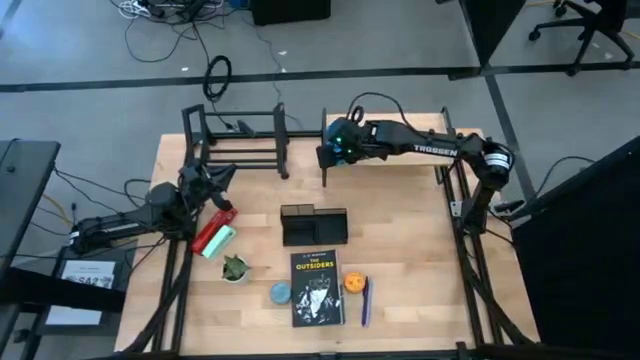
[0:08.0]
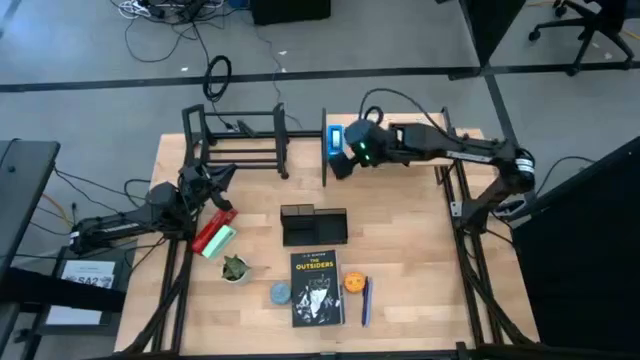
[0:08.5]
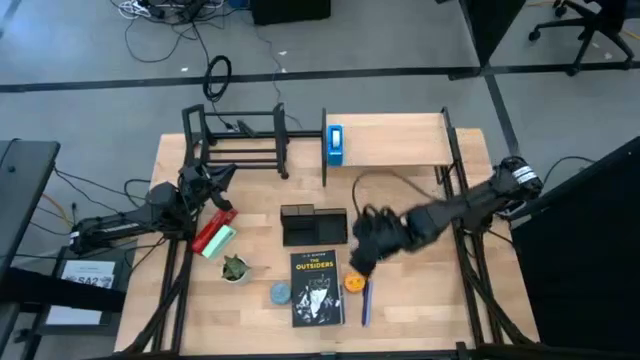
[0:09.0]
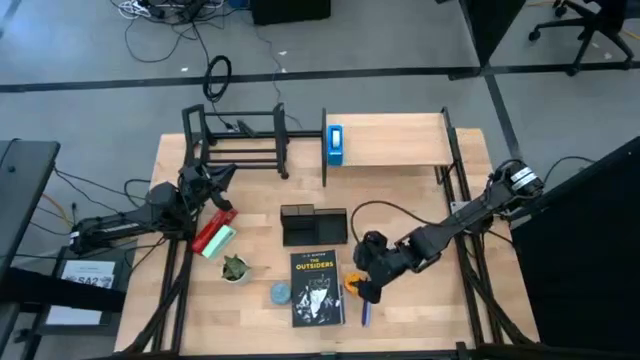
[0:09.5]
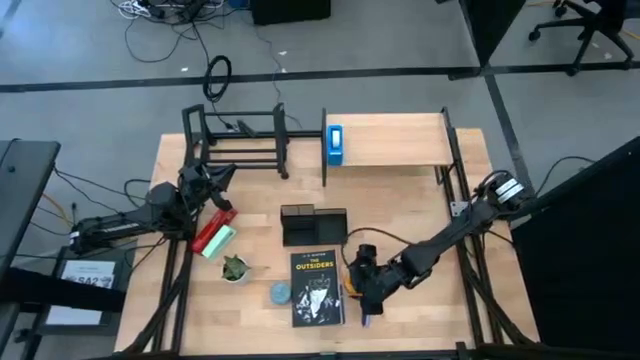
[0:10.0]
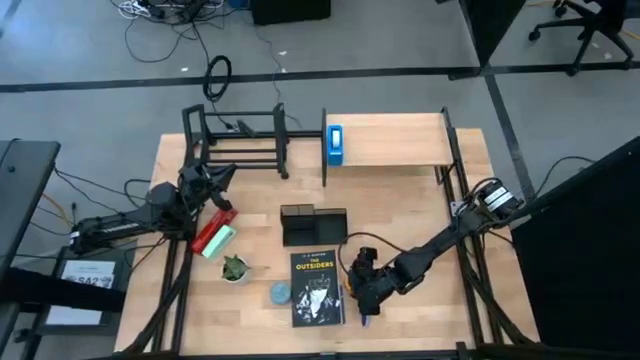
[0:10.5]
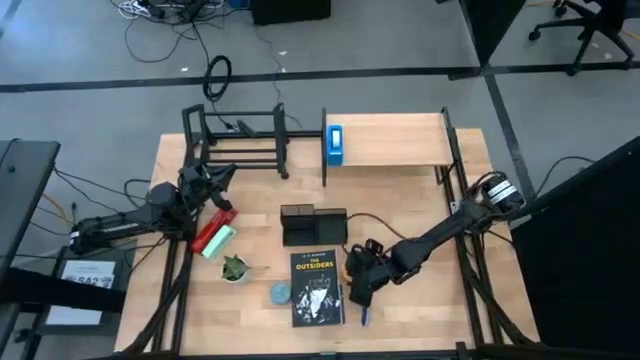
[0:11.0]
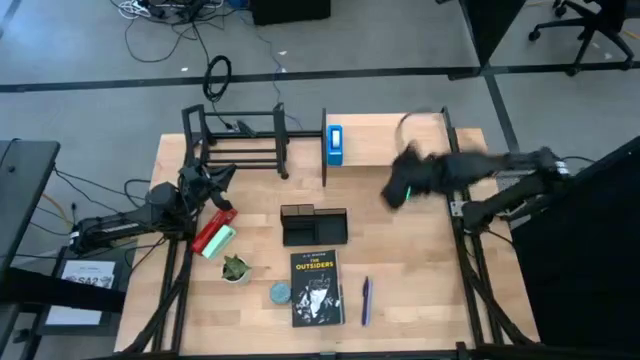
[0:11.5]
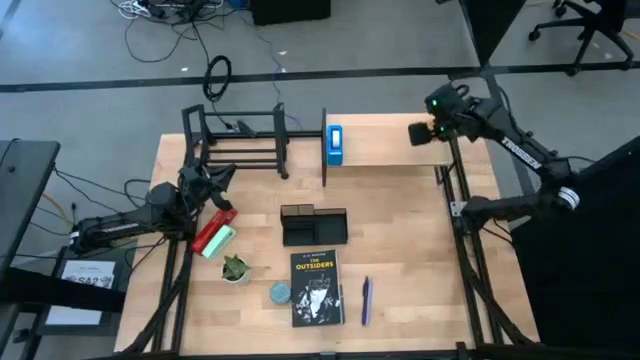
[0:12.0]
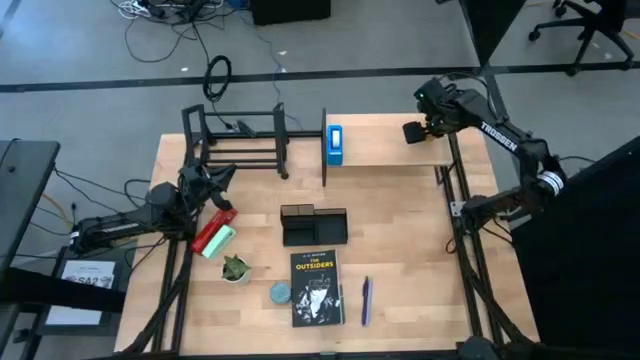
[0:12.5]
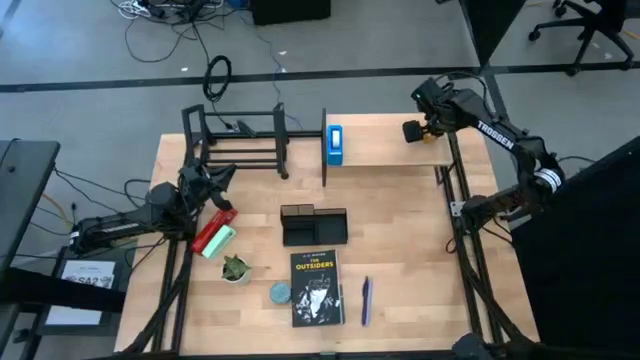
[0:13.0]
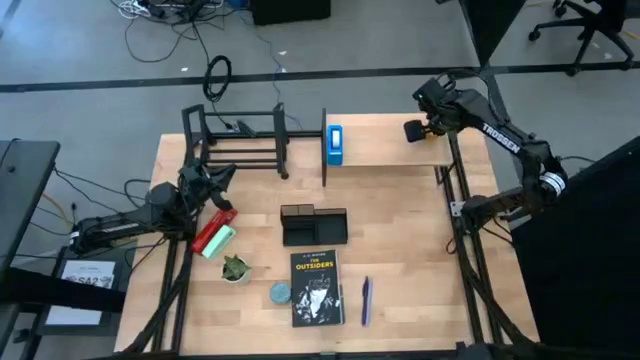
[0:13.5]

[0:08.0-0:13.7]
Task: Stock shelves
Put the yellow scented candle on the shelf

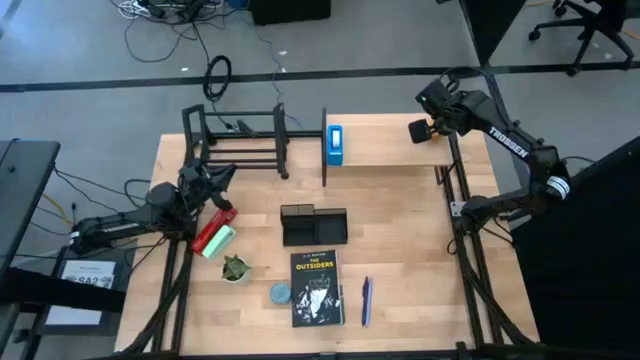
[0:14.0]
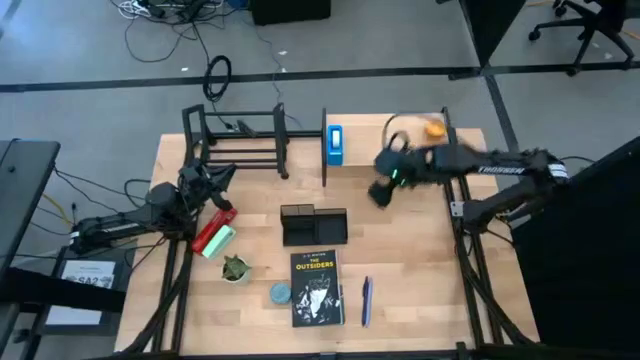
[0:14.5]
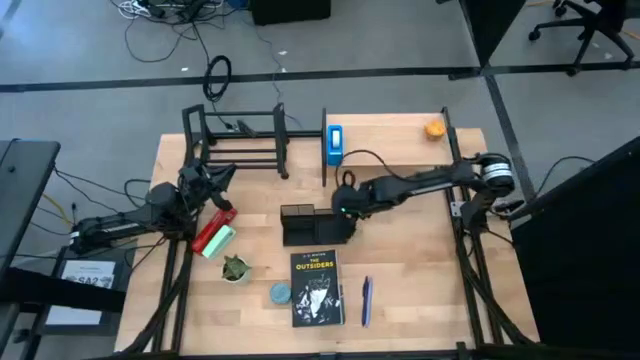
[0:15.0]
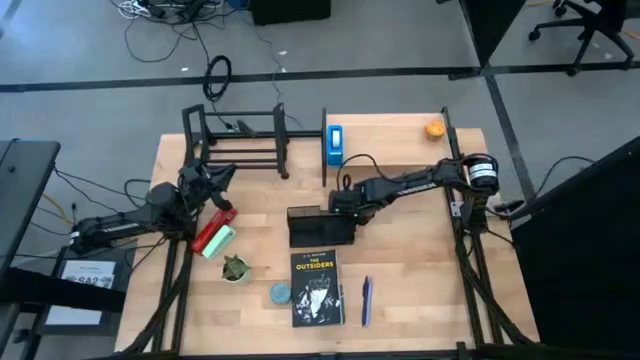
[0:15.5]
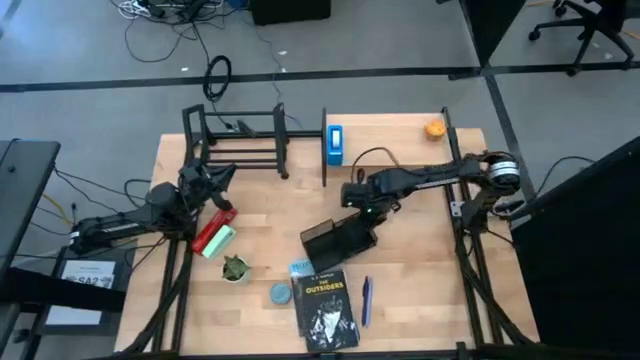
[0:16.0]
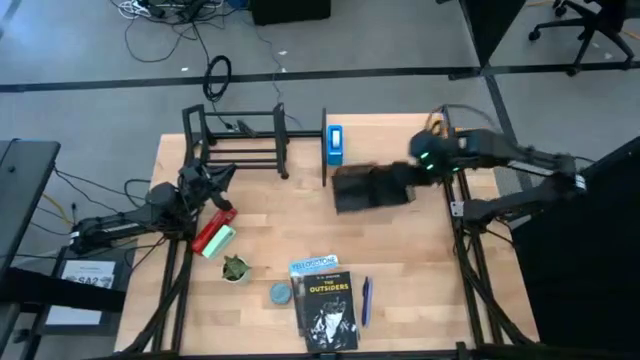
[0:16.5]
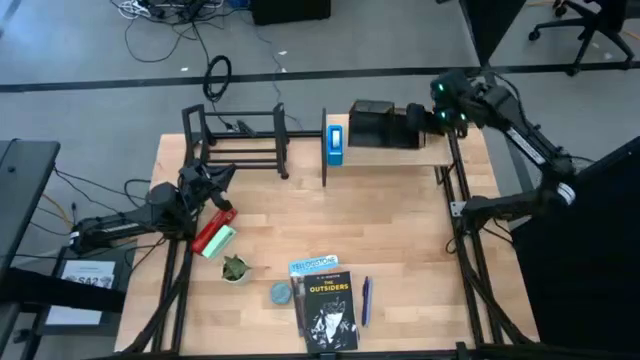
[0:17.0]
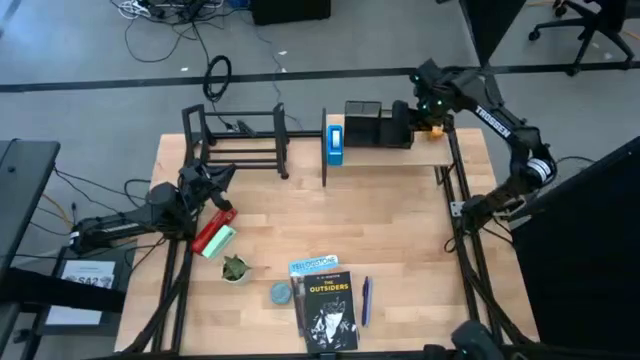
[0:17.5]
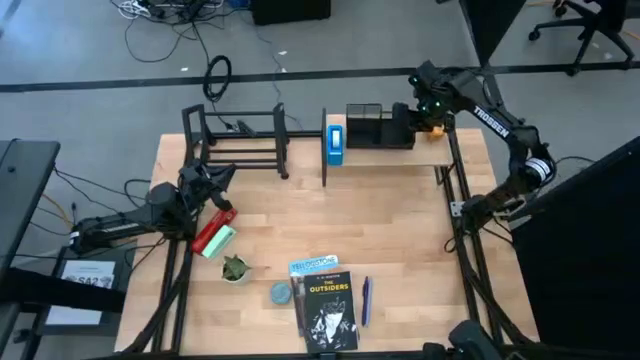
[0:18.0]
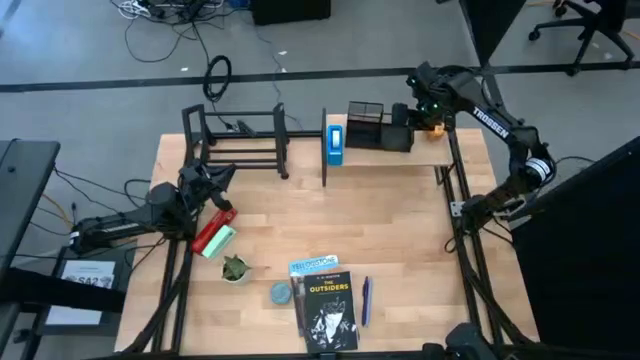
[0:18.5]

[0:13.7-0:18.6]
Put the black pen organizer on the shelf

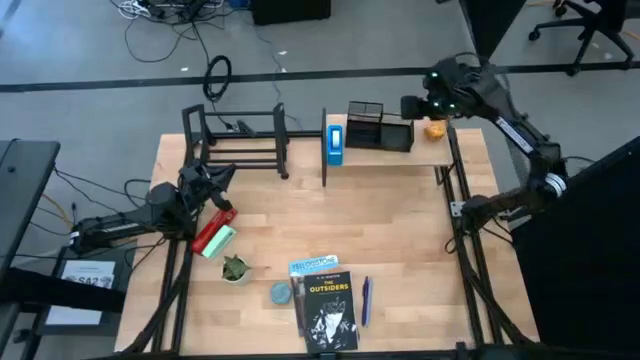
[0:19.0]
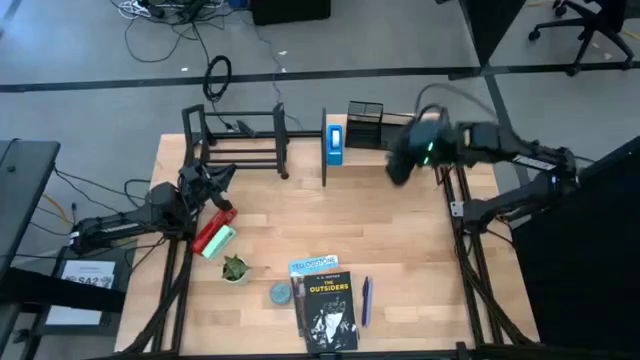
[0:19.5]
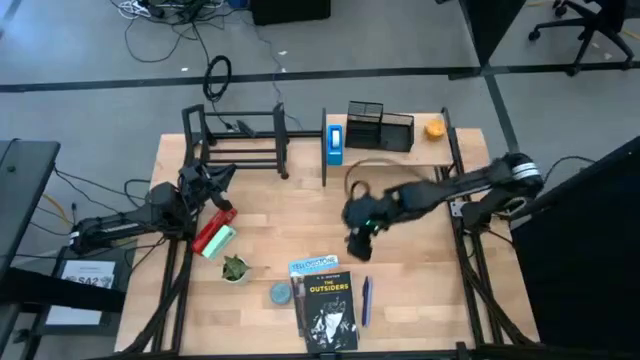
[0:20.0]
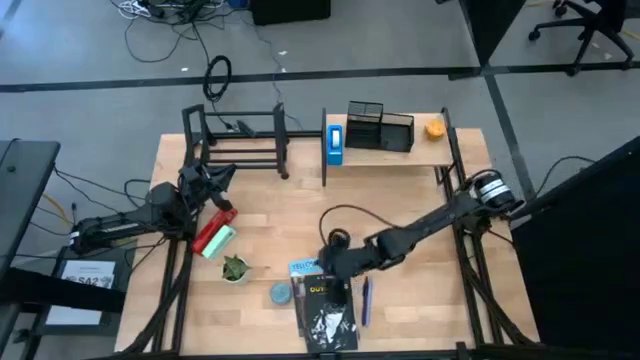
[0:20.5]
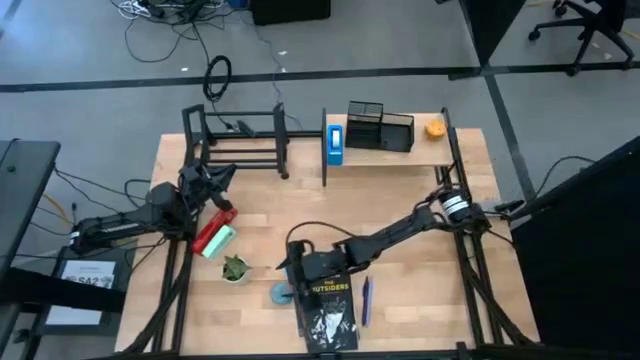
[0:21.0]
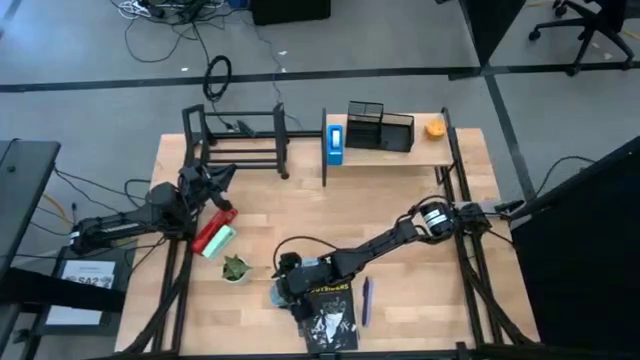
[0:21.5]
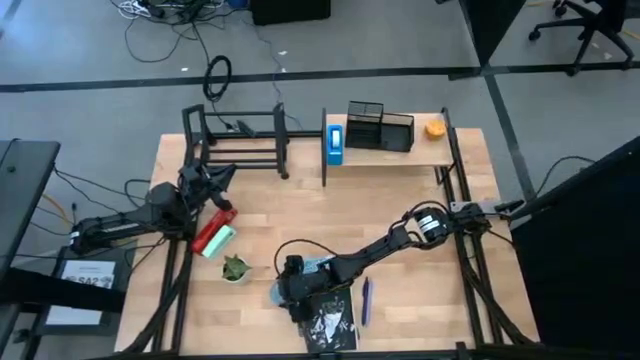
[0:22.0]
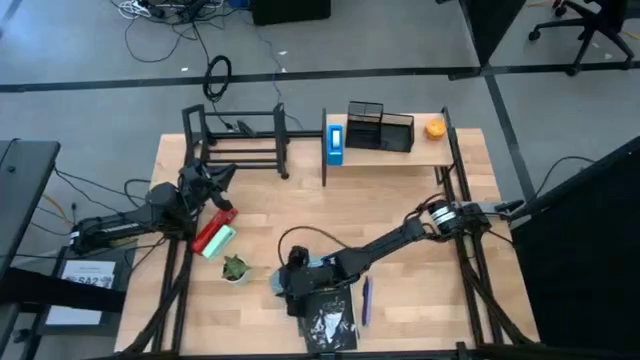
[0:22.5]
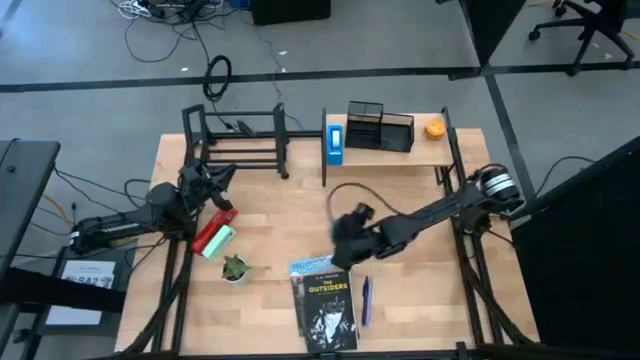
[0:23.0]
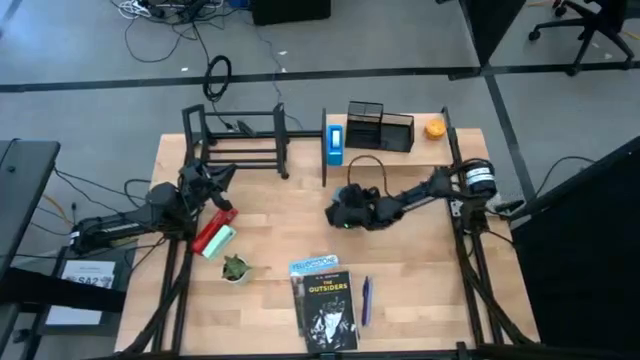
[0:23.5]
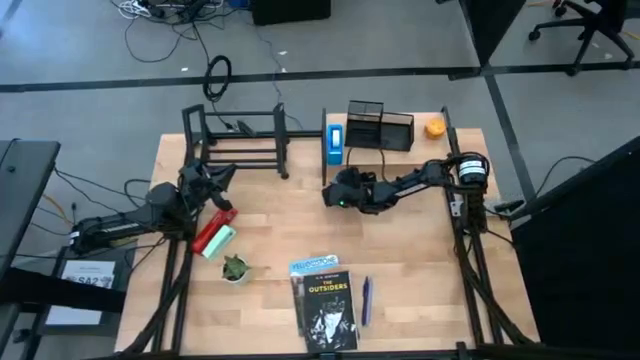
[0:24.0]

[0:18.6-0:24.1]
Put the green scented candle under the shelf

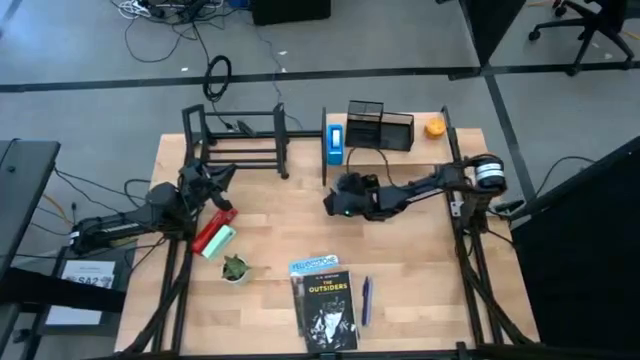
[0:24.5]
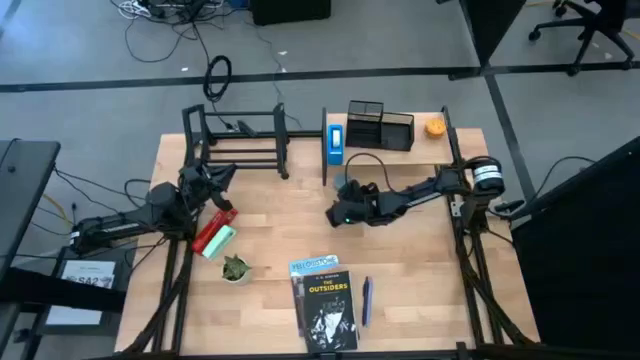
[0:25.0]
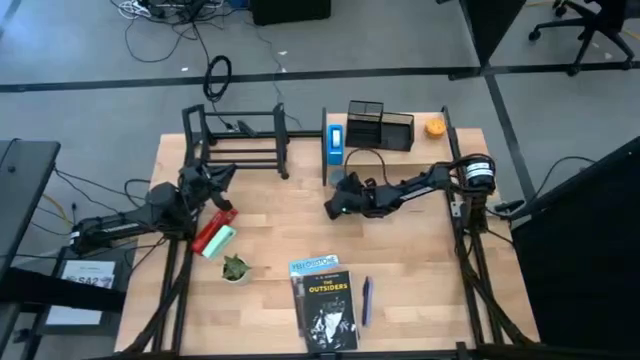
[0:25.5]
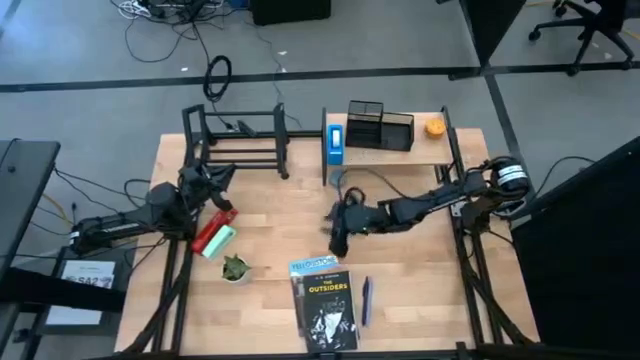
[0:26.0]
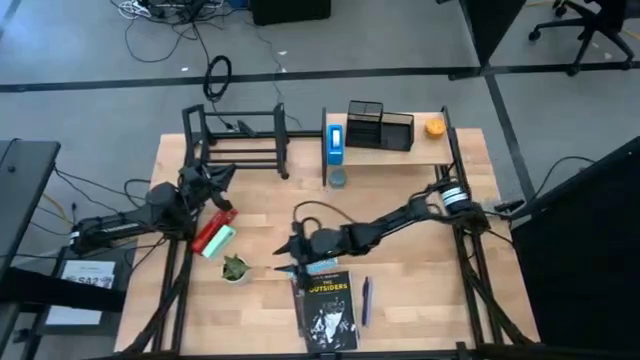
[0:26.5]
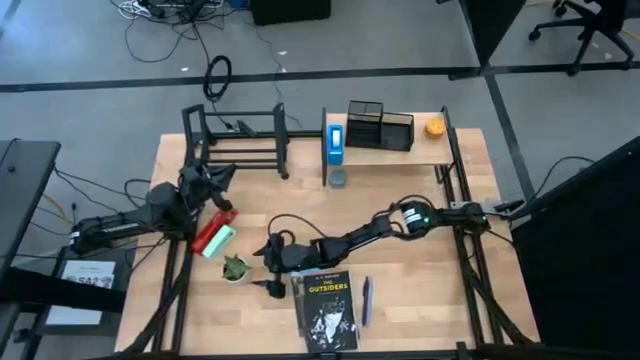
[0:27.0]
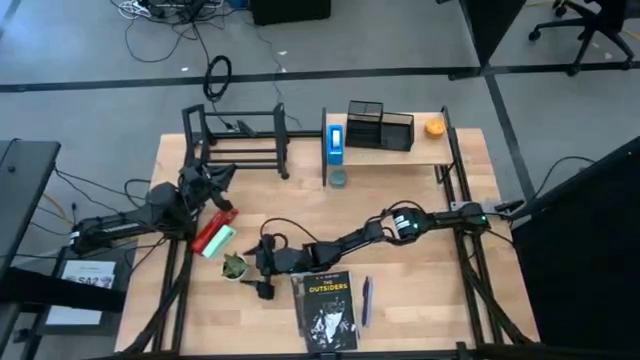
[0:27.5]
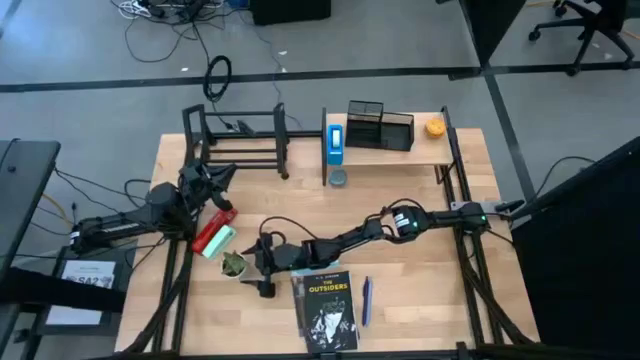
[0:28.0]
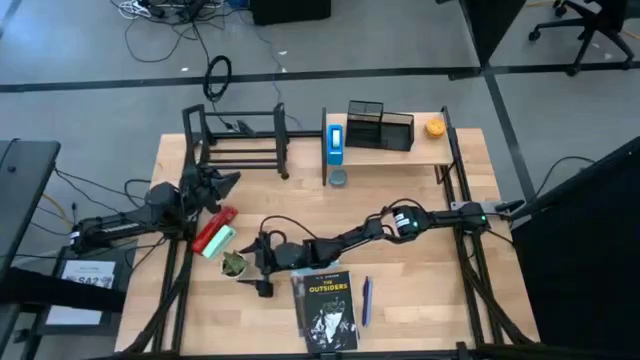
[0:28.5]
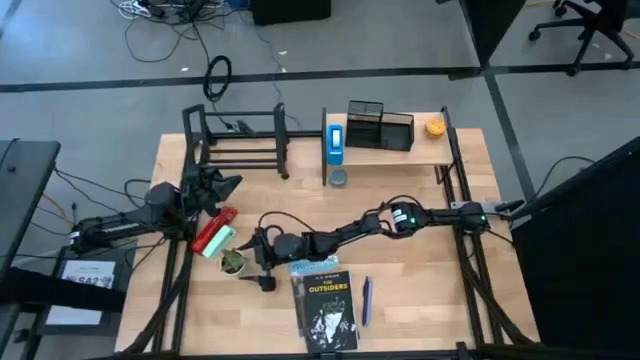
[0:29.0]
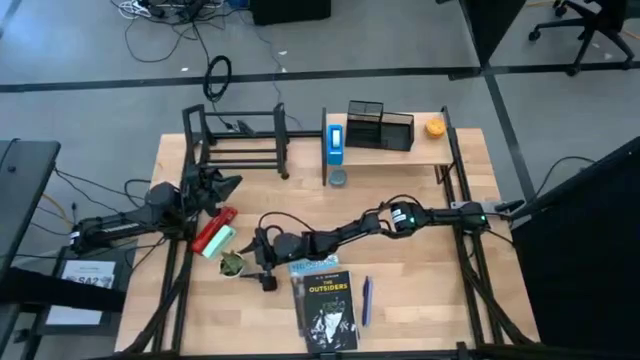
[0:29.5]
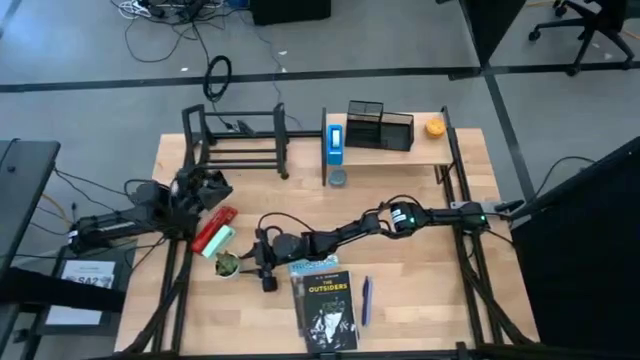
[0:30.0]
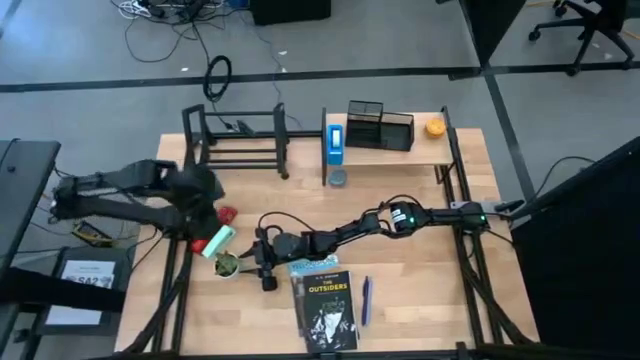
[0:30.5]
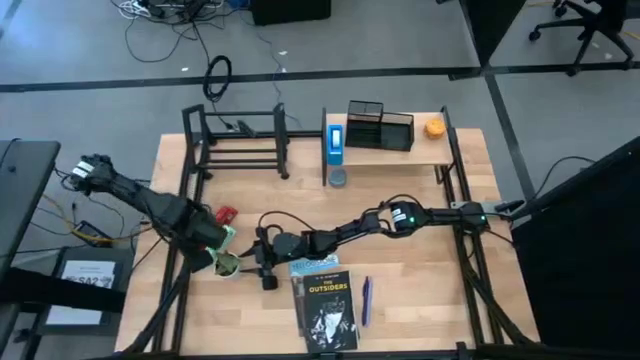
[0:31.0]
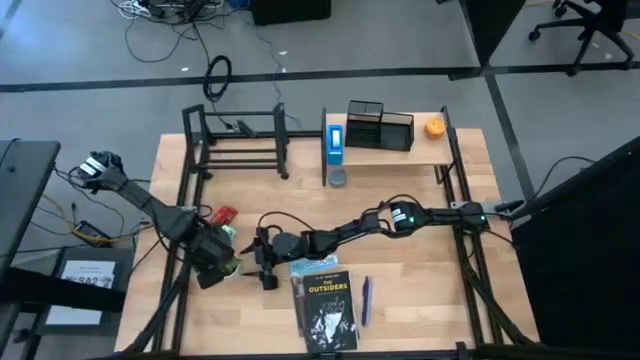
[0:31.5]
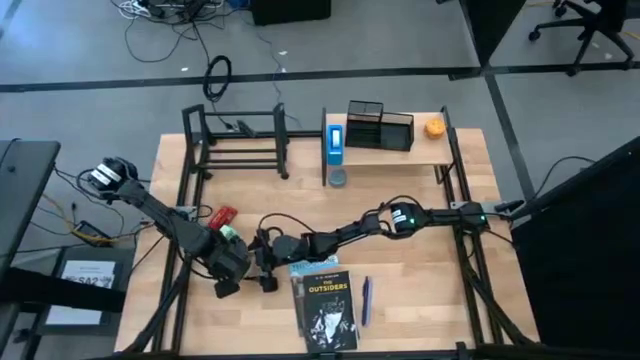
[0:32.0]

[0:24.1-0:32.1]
Put the white vase plant under the shelf
